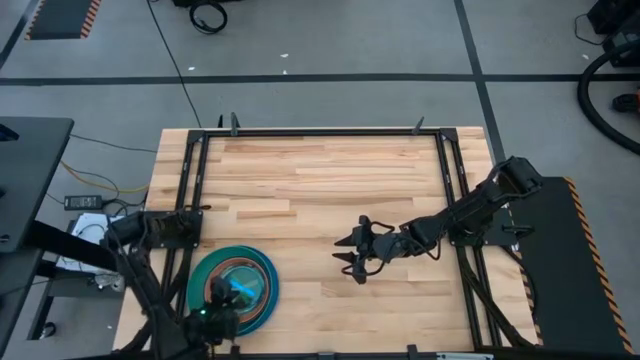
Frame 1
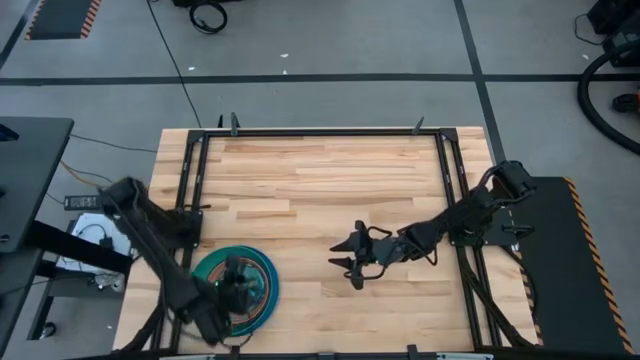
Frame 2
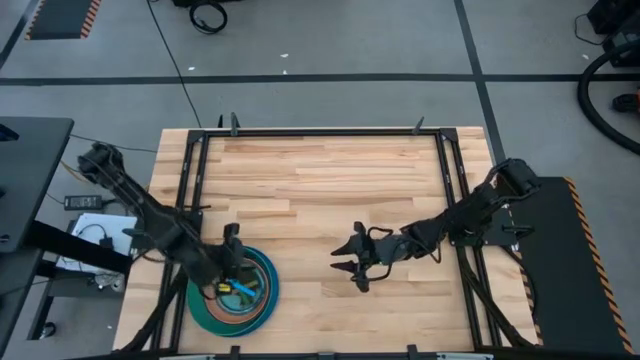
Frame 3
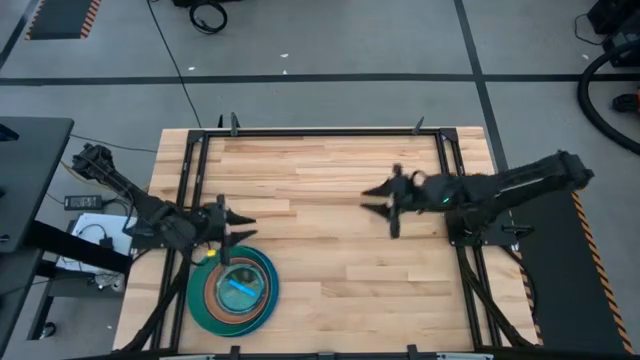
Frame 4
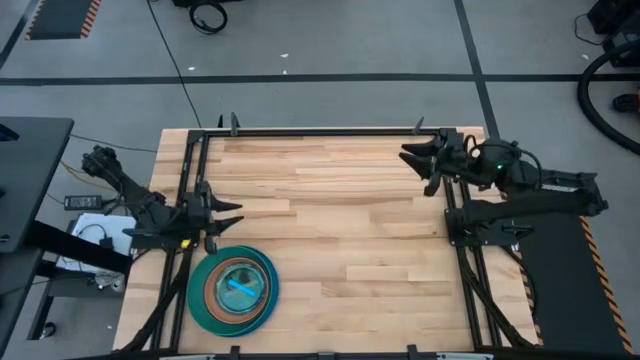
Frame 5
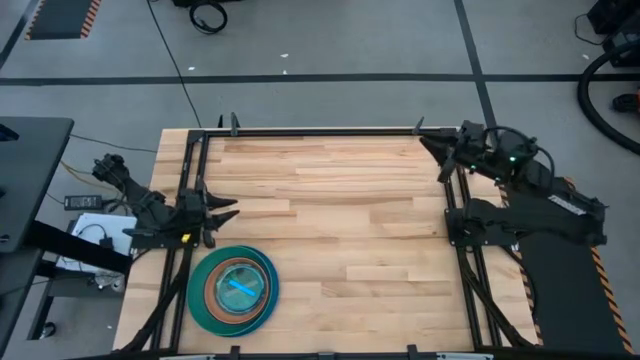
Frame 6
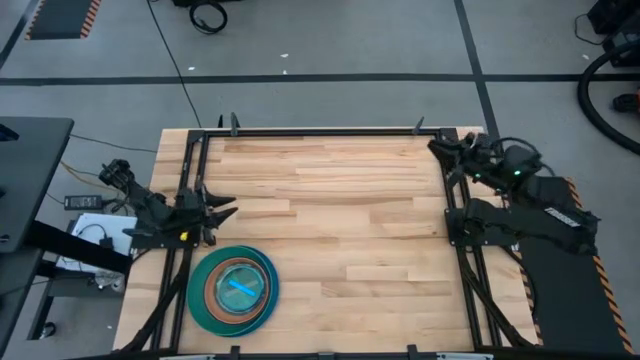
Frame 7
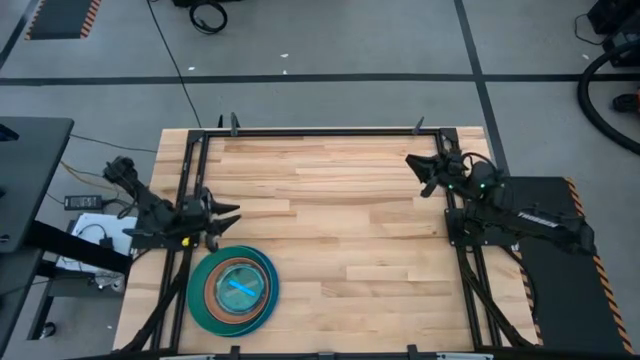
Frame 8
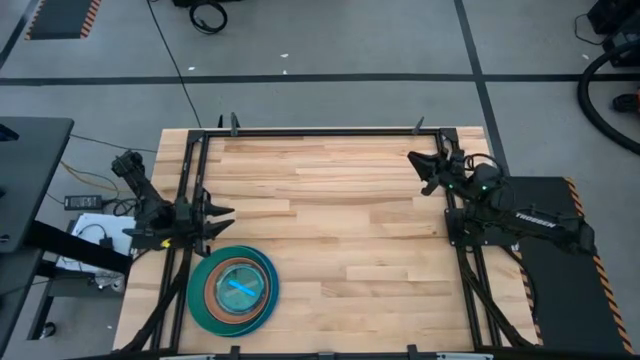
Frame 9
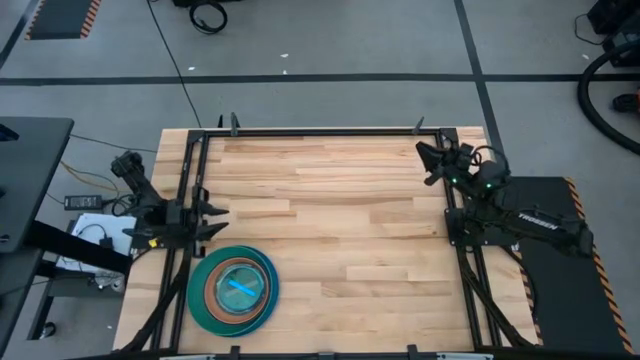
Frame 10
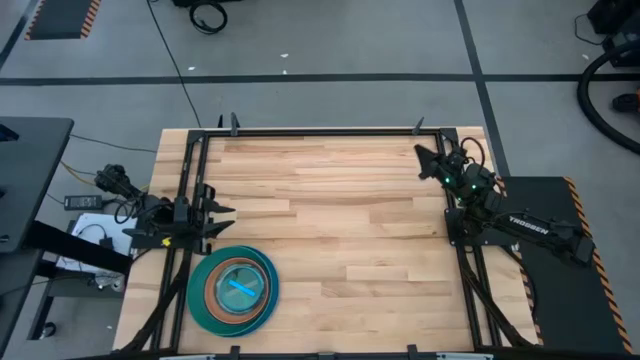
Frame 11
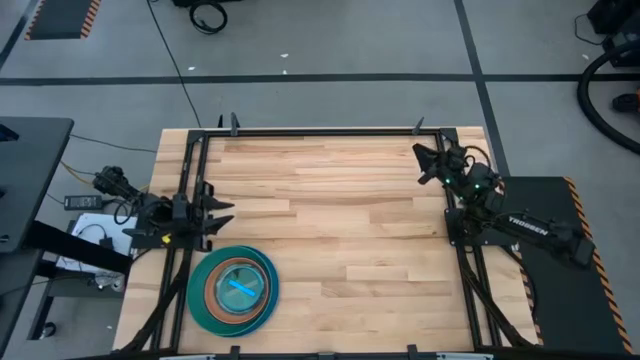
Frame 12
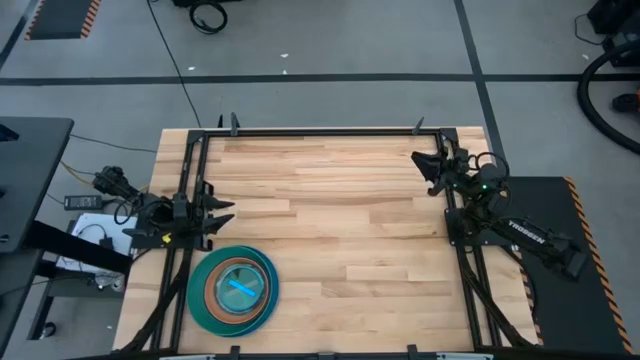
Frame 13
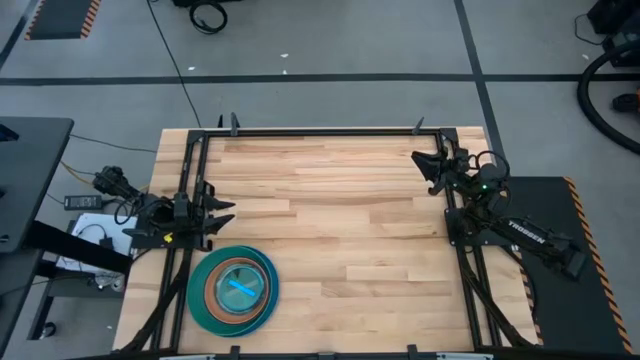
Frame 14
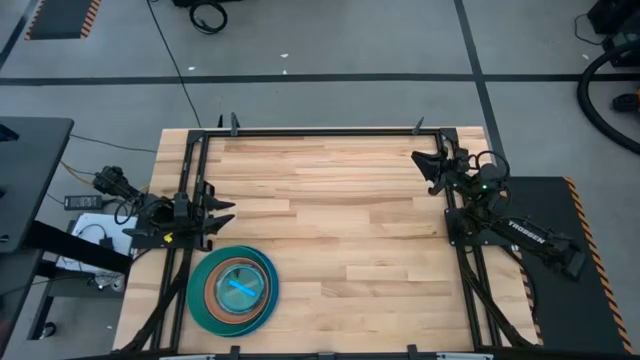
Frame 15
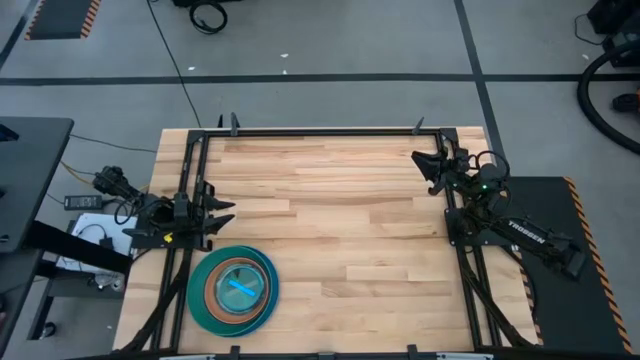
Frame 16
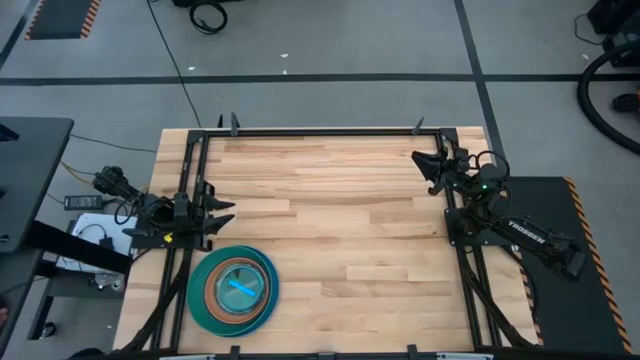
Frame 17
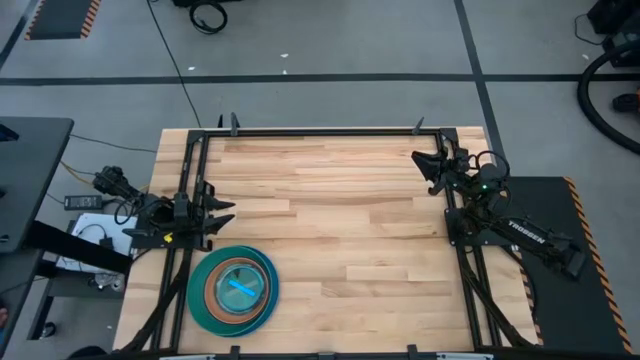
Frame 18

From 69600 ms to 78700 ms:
Task: Stack plastic plates
Return to Home Position

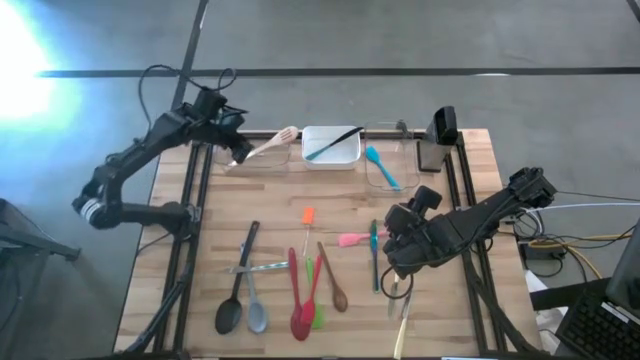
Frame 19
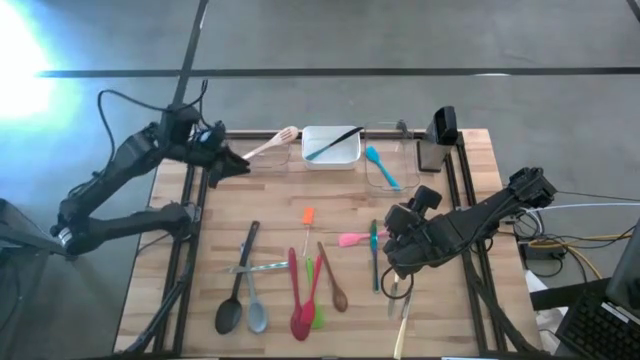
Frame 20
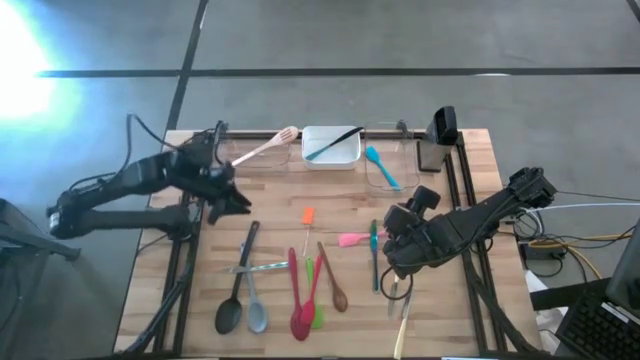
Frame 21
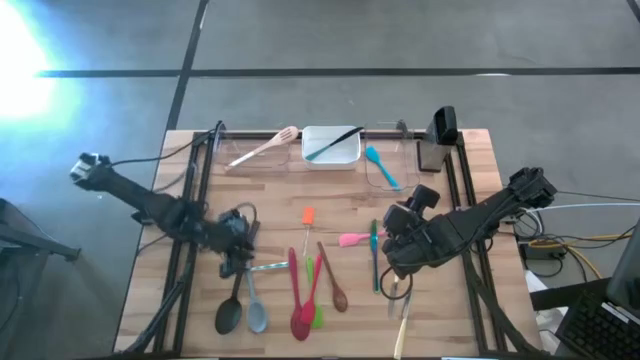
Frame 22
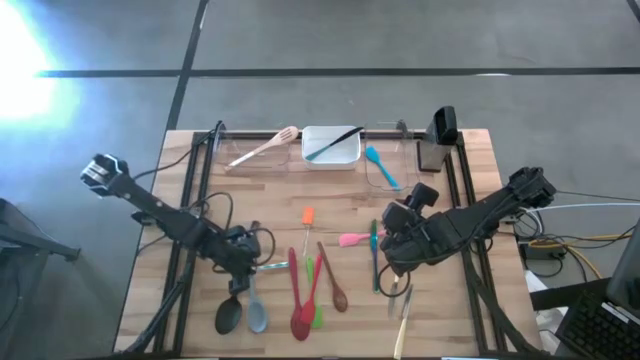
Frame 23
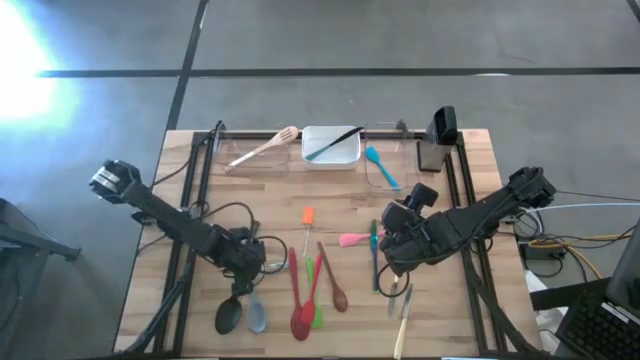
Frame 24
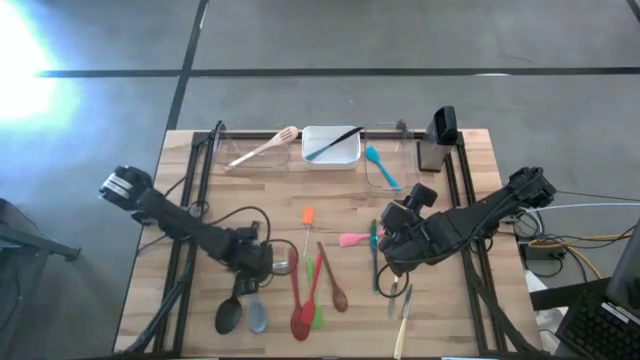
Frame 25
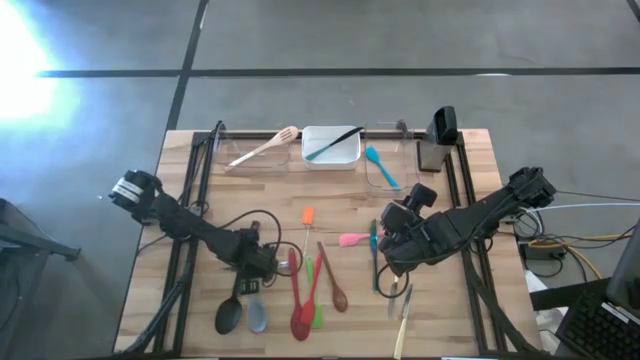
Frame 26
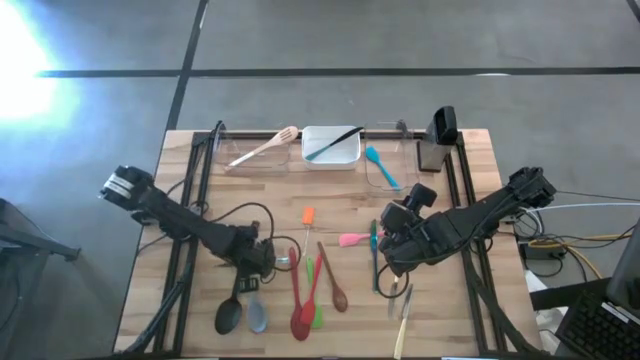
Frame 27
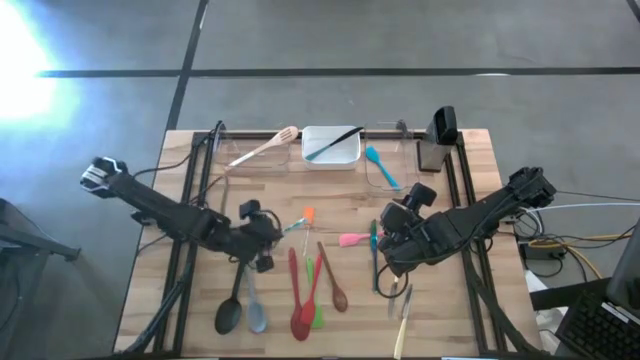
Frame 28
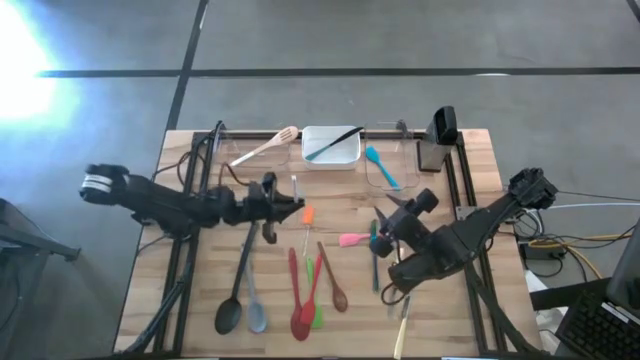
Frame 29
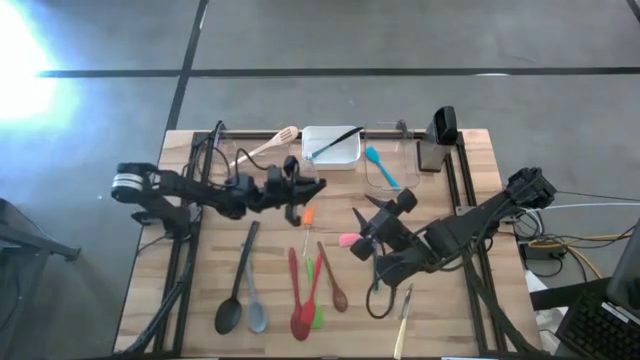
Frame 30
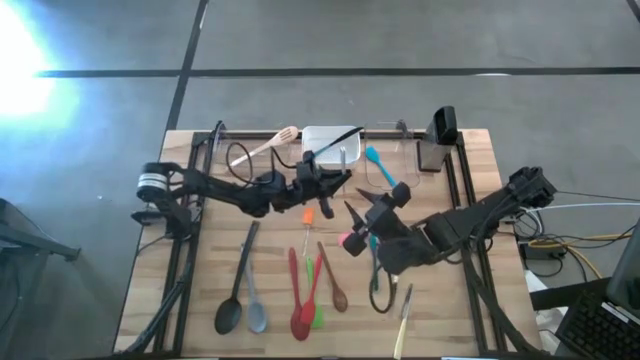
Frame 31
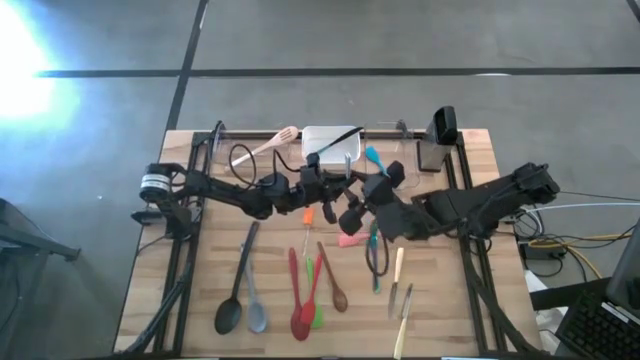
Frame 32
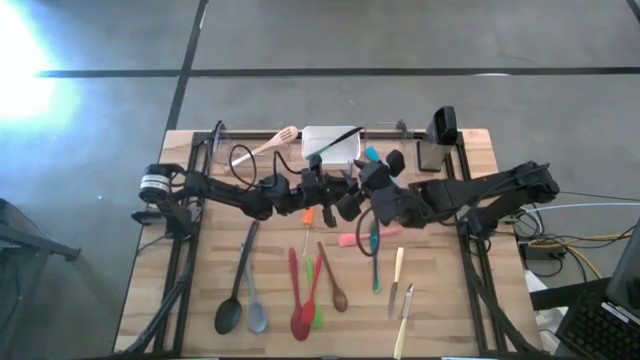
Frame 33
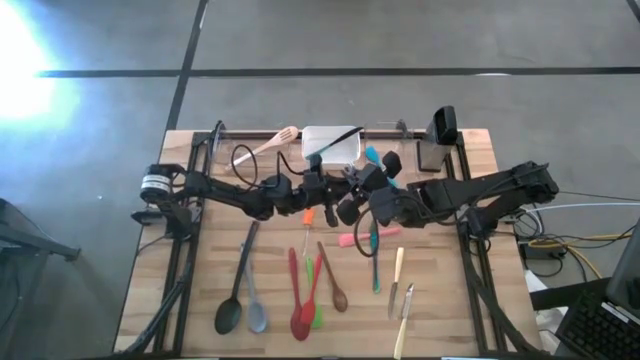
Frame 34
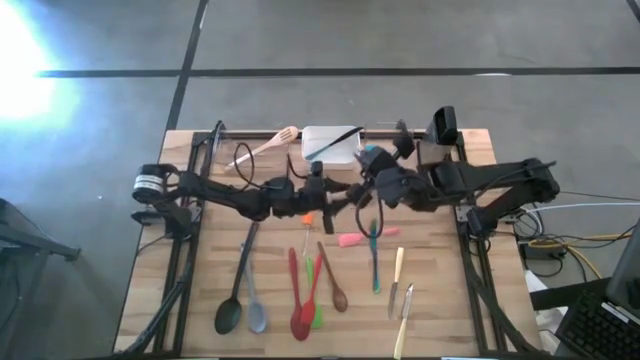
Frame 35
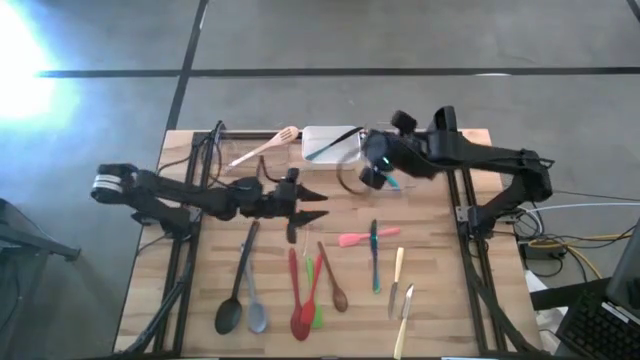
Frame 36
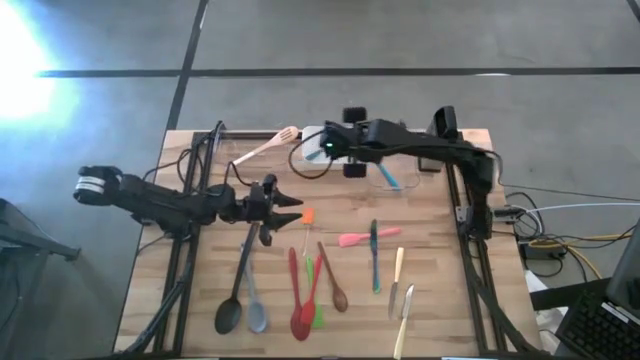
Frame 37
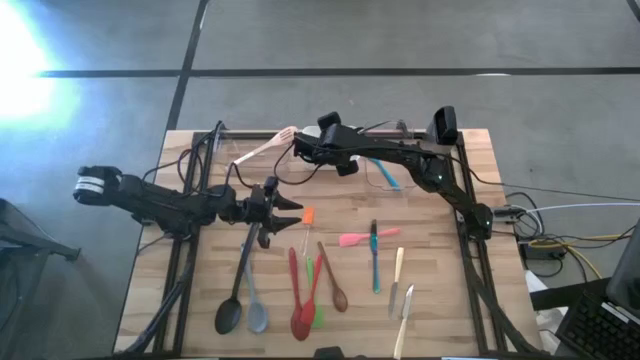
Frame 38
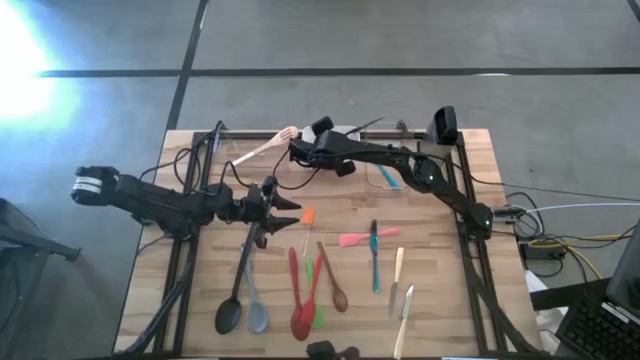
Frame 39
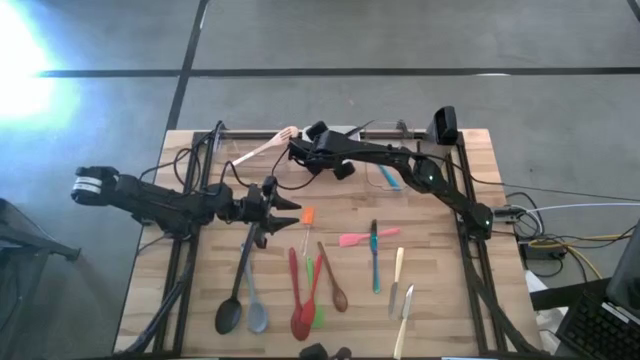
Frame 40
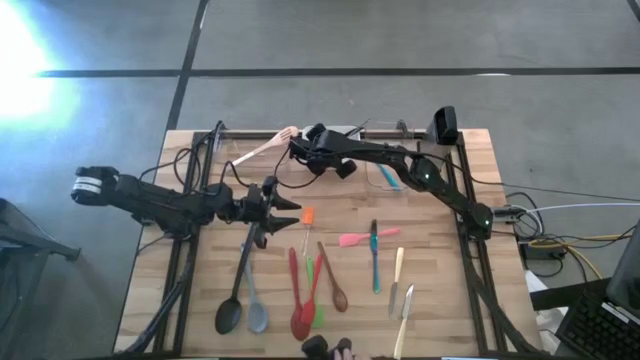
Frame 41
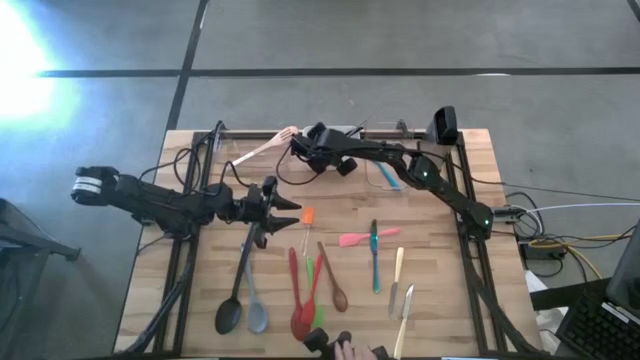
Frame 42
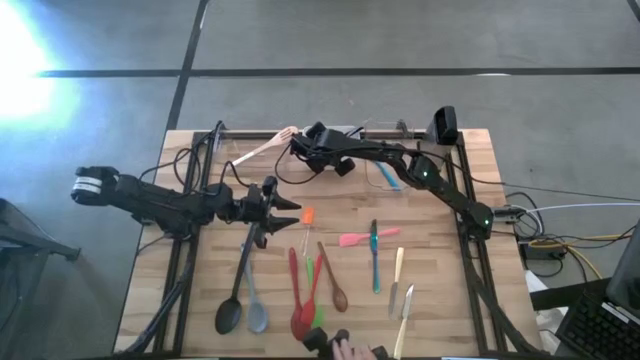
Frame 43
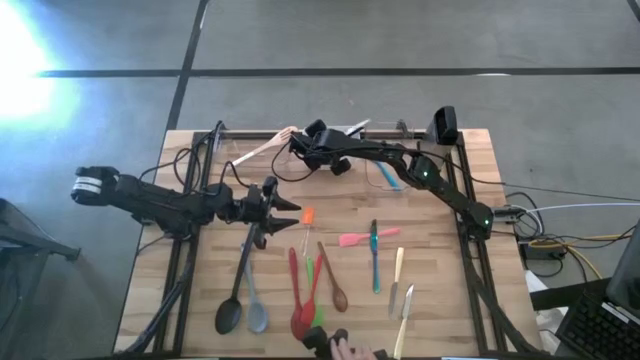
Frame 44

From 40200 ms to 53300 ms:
Task: Pick & Place Kitchen Items
Put the white patterned table knife into the white bin
